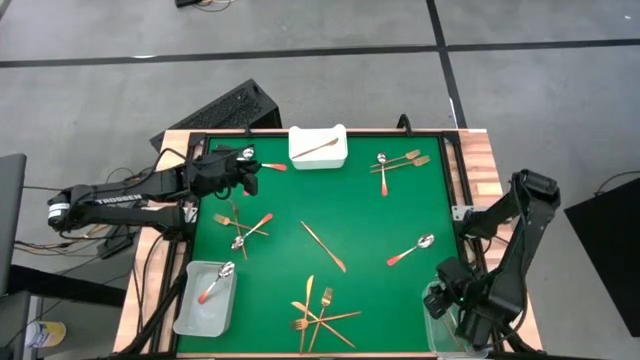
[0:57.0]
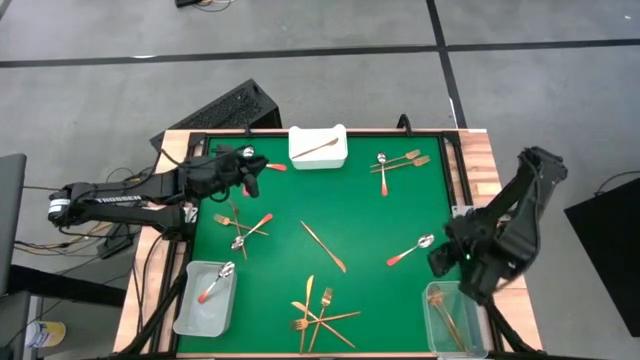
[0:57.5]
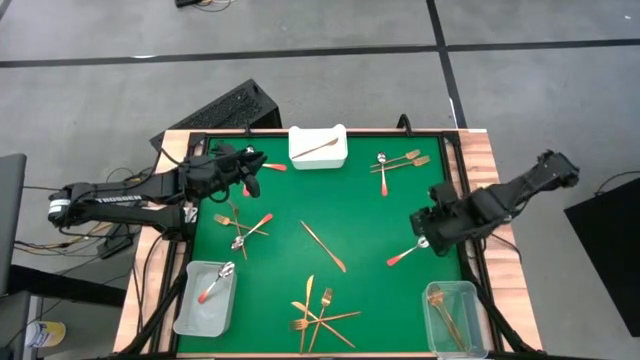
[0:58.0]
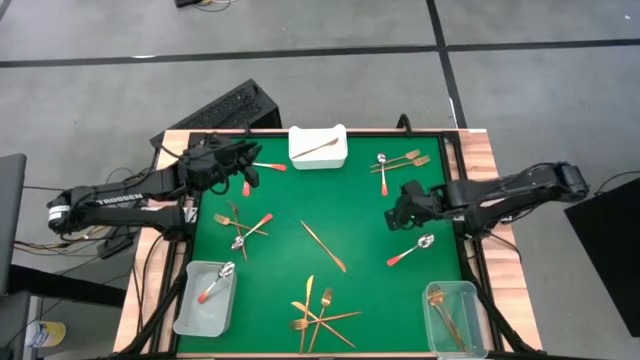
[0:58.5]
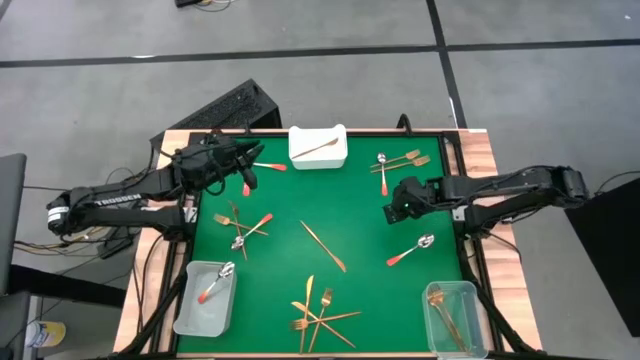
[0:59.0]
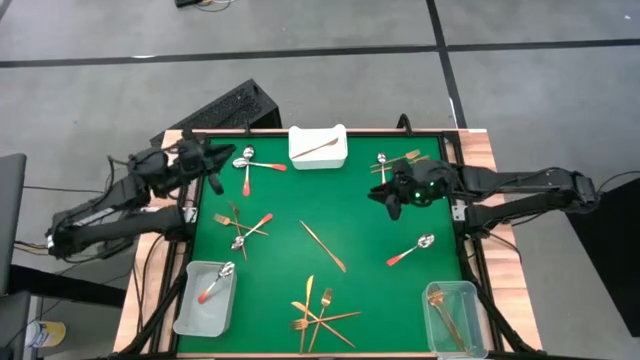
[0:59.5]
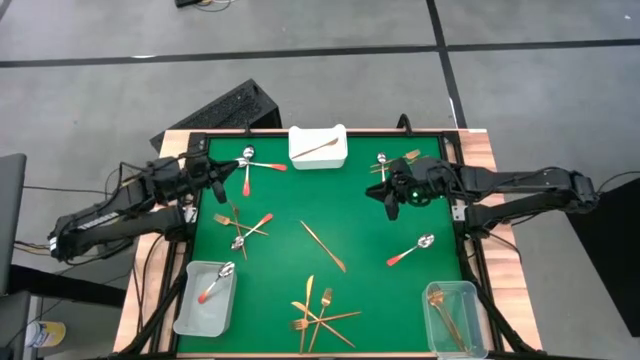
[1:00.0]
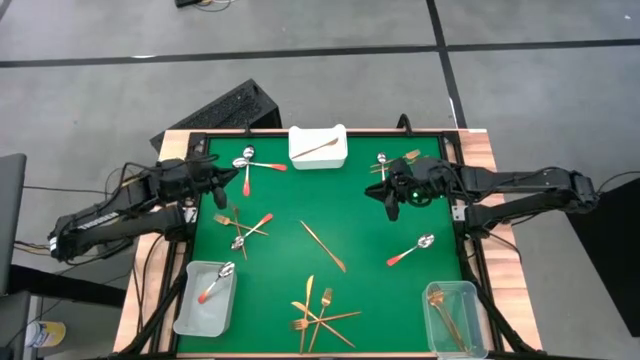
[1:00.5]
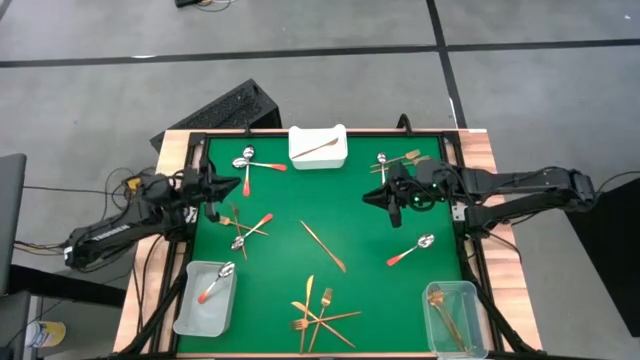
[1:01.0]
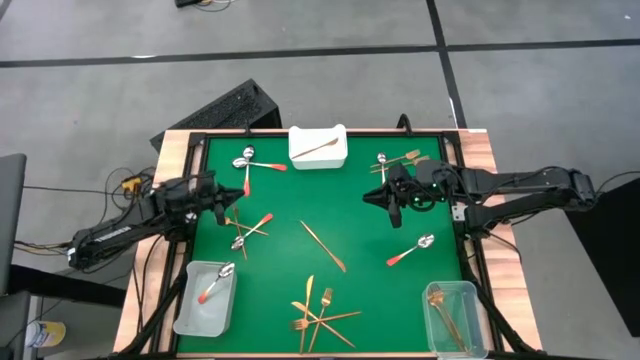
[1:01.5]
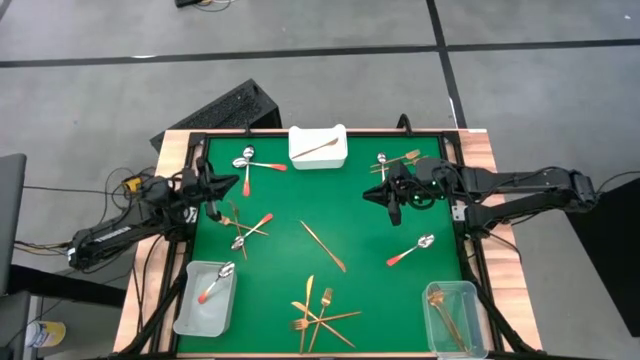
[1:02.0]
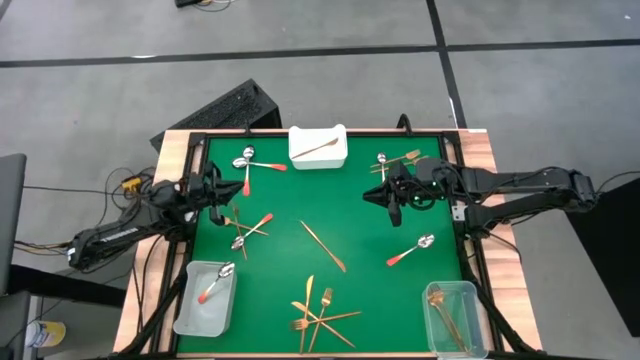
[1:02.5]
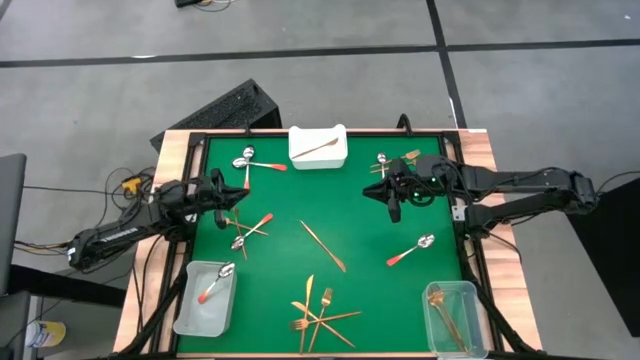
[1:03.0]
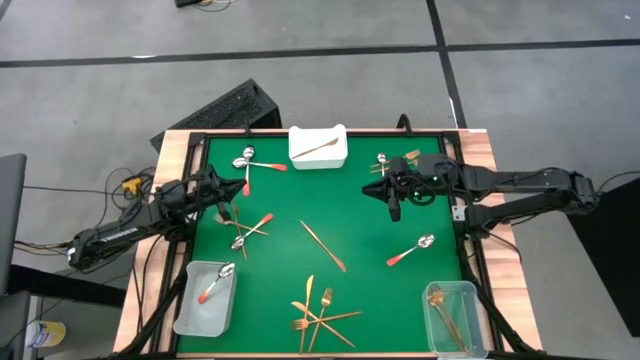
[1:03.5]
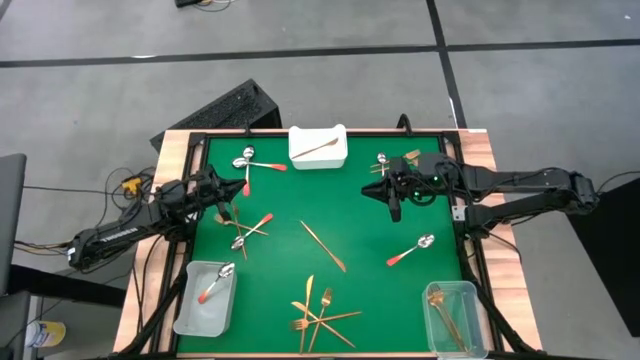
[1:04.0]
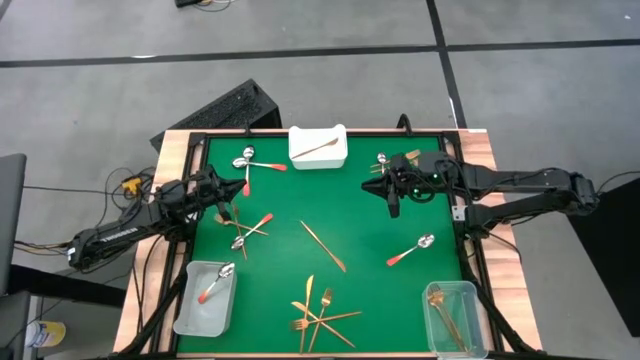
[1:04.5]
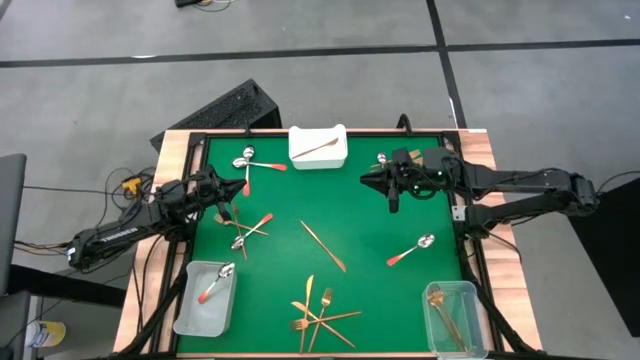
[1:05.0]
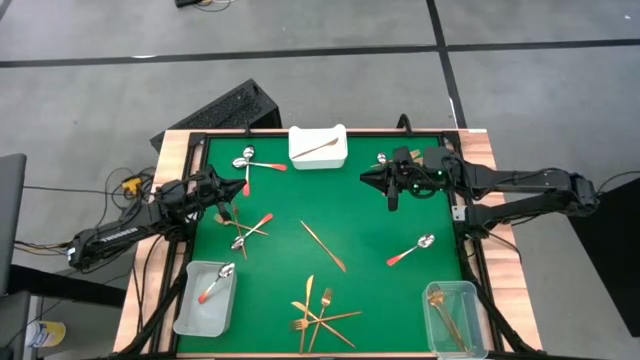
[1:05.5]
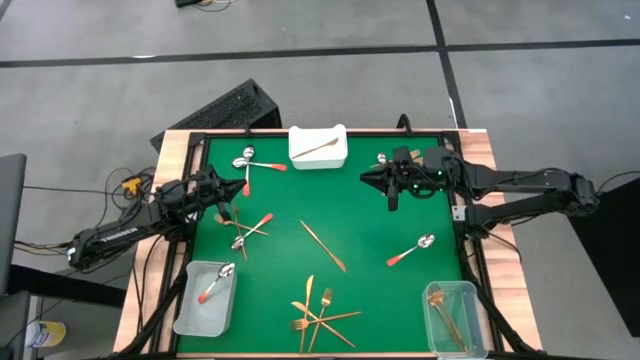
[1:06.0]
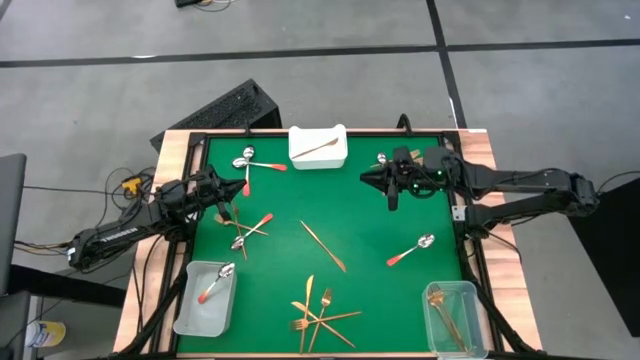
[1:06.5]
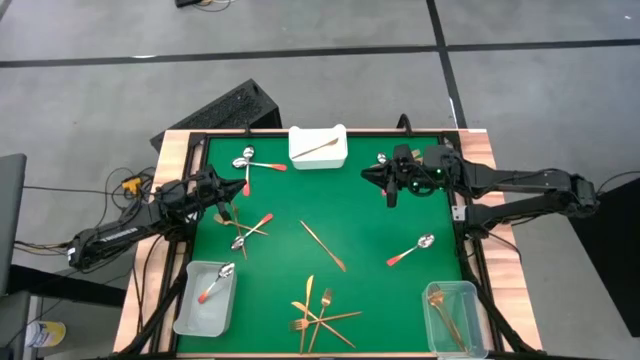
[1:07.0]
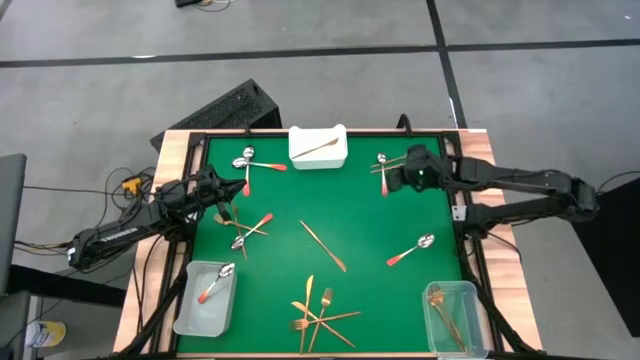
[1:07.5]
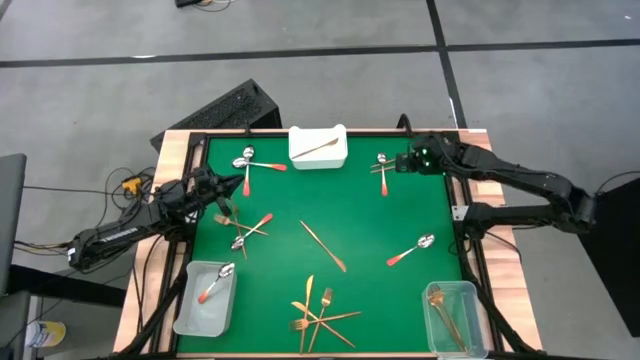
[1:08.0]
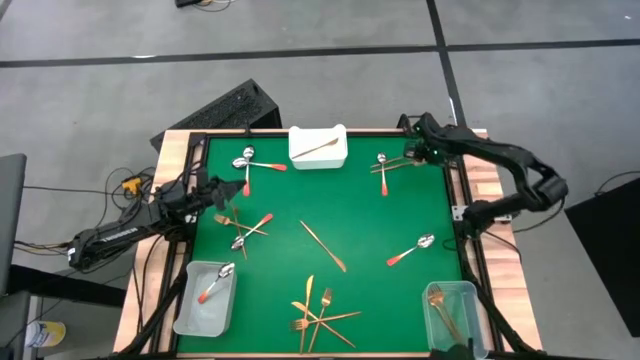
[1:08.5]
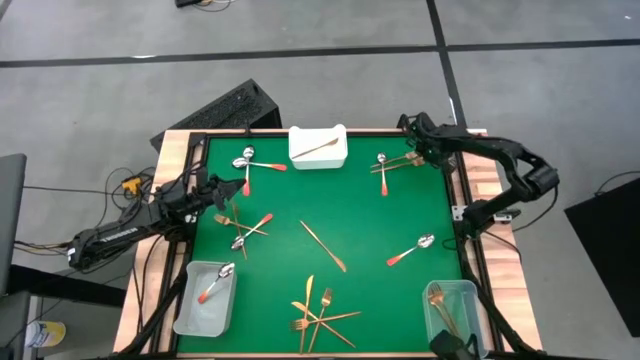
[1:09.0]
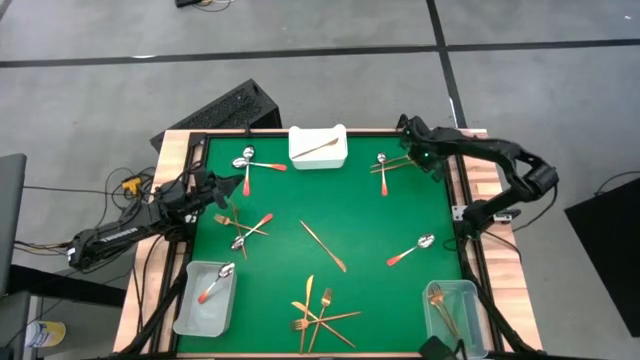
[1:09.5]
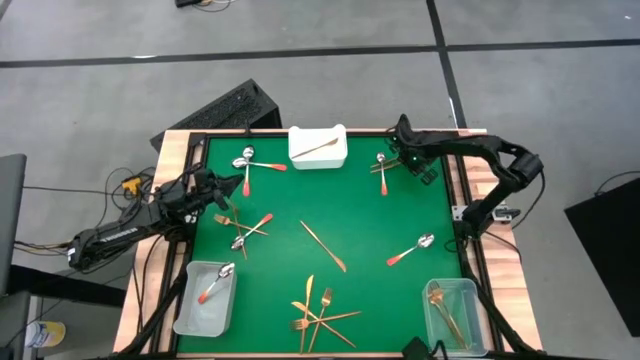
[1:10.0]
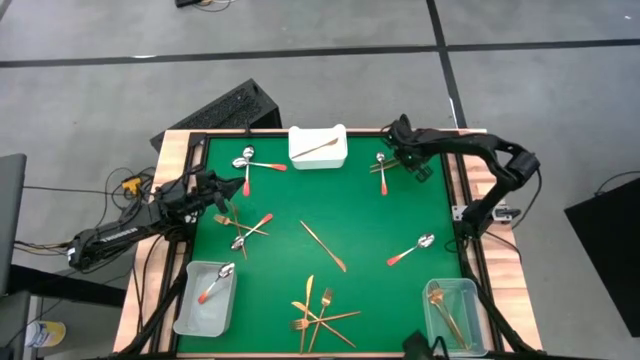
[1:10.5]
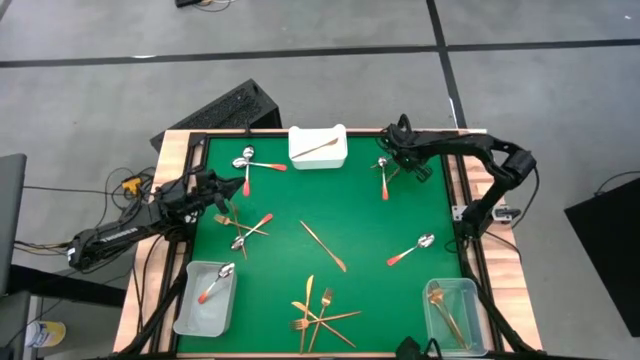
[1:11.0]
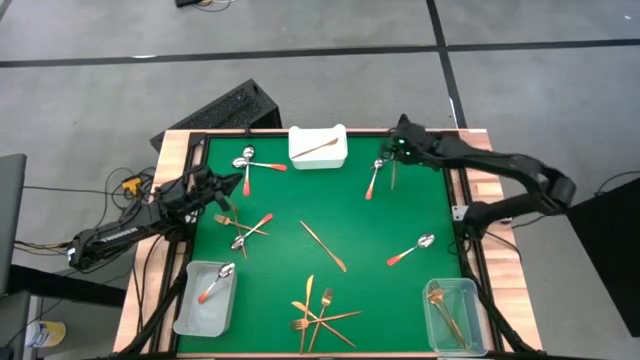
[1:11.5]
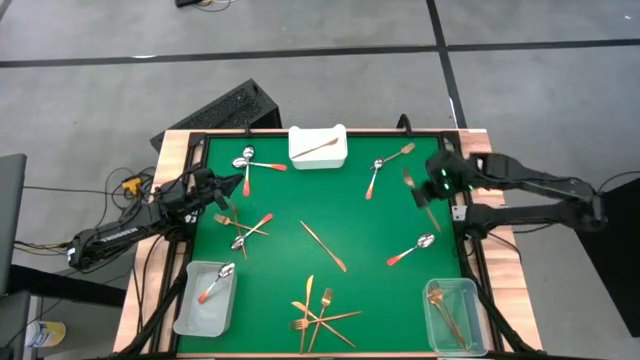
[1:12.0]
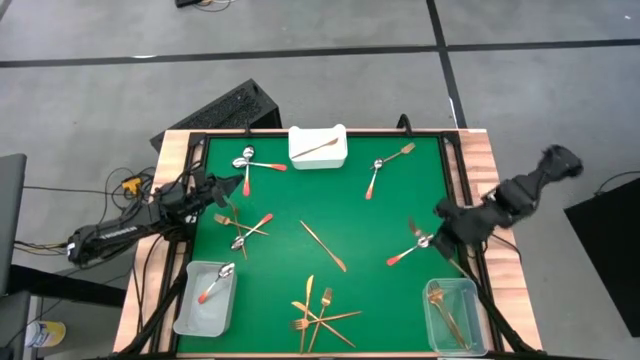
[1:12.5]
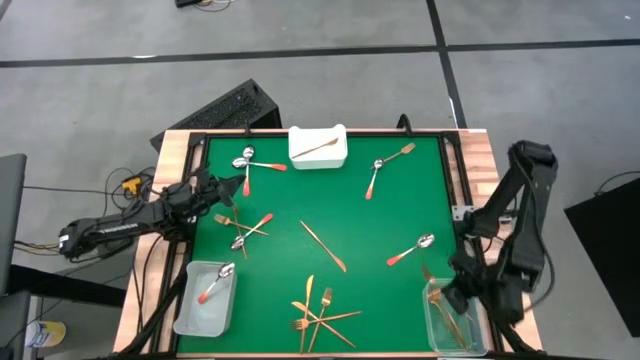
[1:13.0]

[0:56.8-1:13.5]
Task: Sort silverware by color (type)
Put the gold fork into the transparent bin

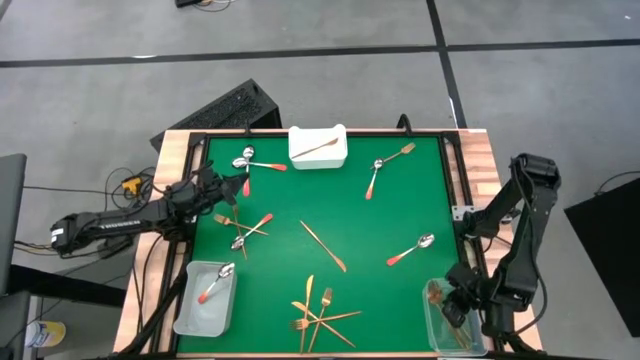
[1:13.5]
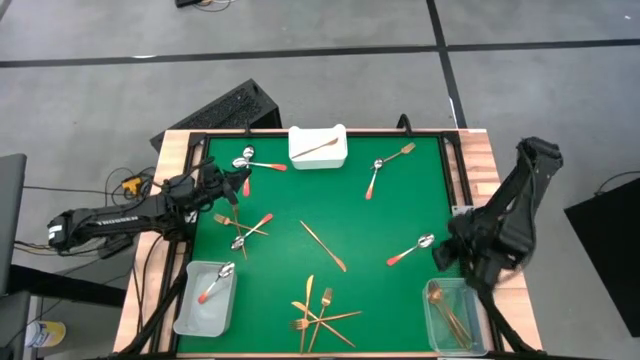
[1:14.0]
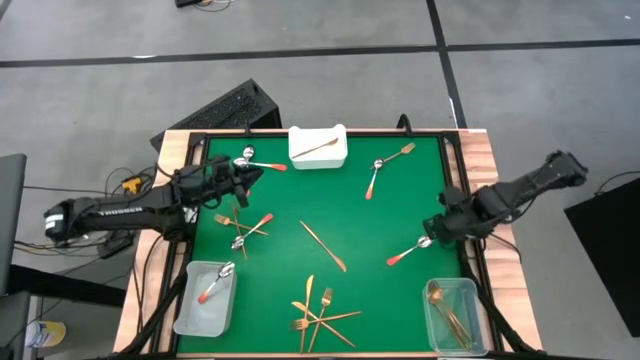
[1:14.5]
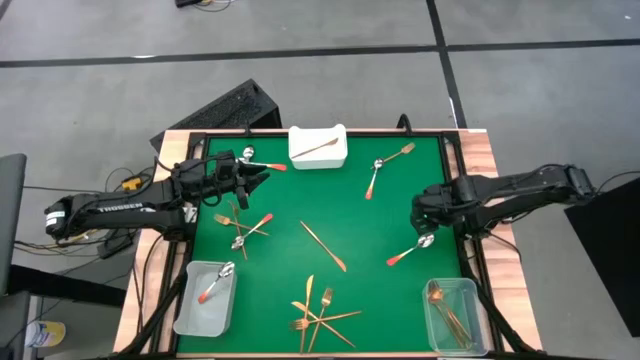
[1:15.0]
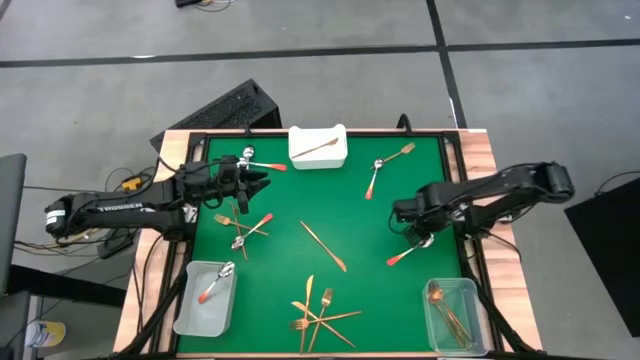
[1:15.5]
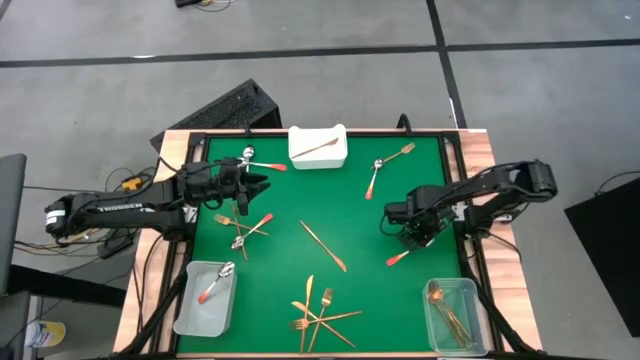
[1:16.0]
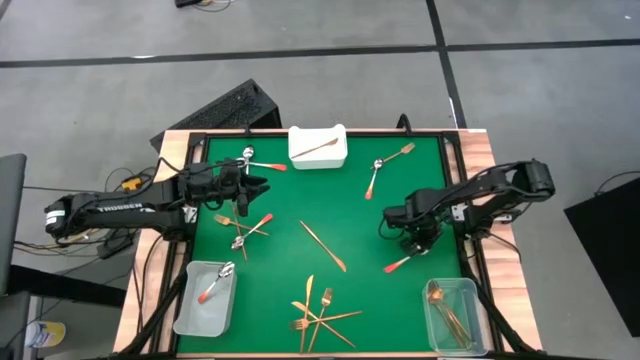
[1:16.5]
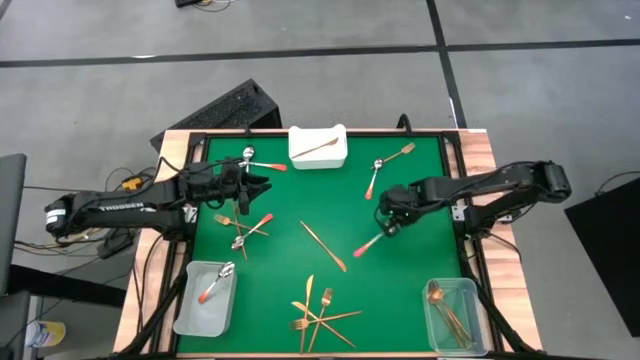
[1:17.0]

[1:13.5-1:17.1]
Put the orange spoon into the gray bin

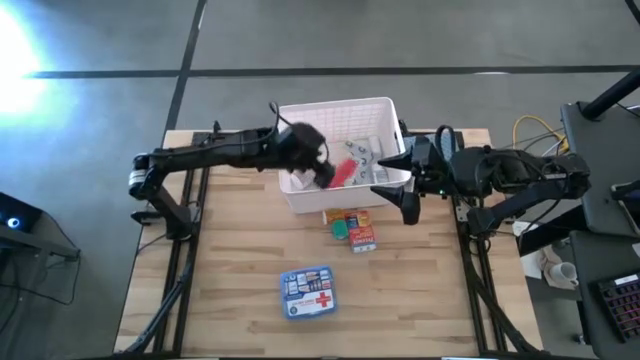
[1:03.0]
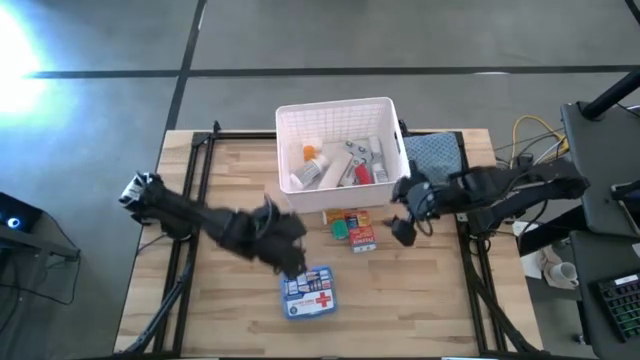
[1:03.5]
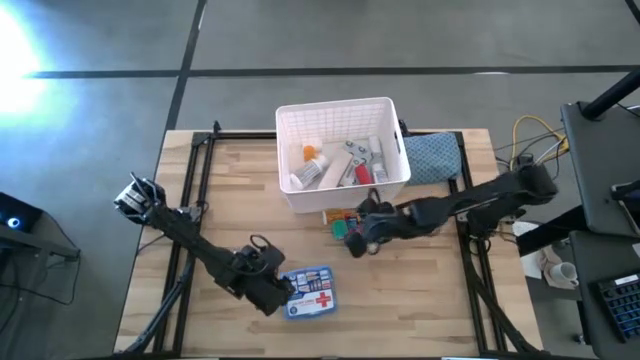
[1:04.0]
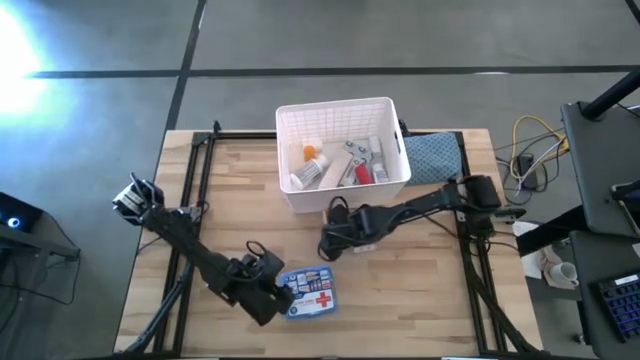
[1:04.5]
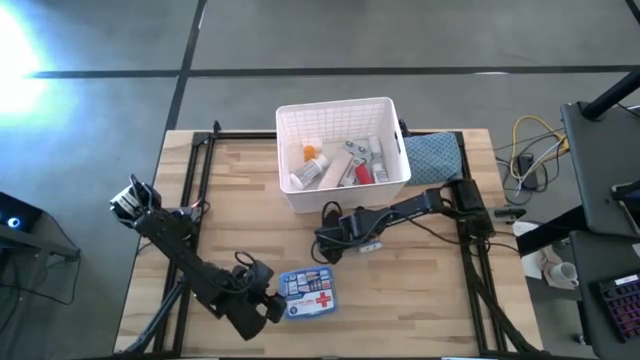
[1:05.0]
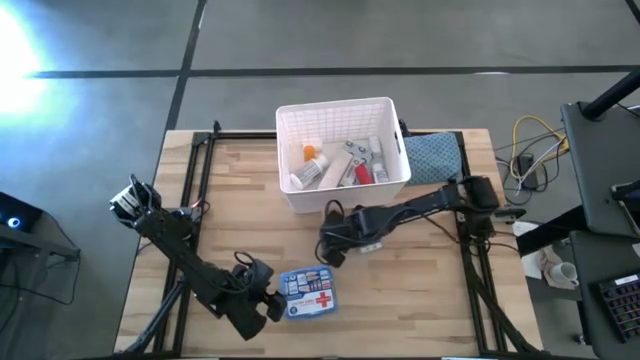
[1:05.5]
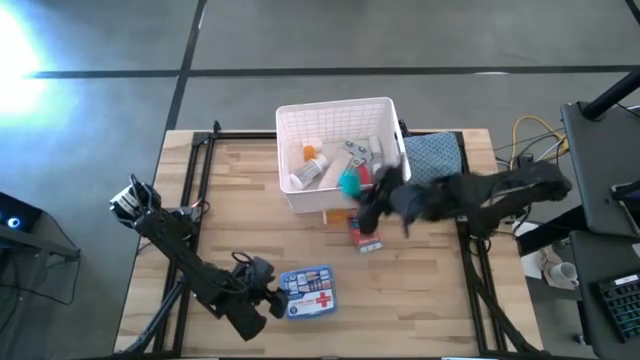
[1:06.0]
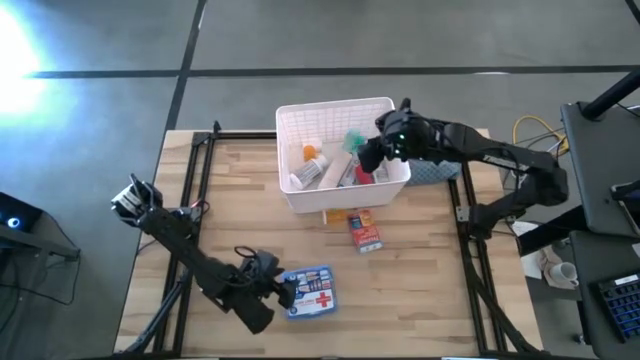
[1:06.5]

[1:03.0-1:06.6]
Task: Pick & place medical supplies in basket/bin
Put the green rolled bandage into the white container
